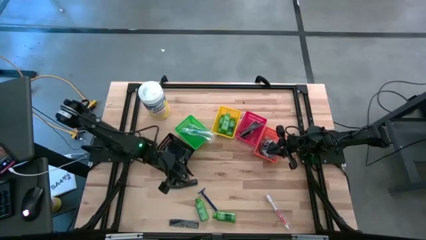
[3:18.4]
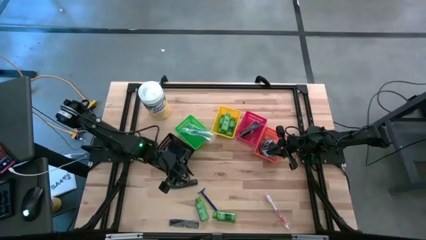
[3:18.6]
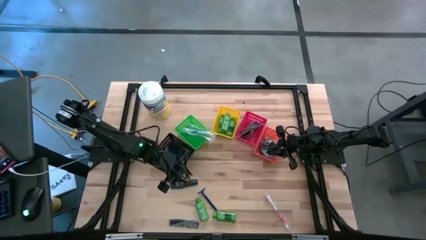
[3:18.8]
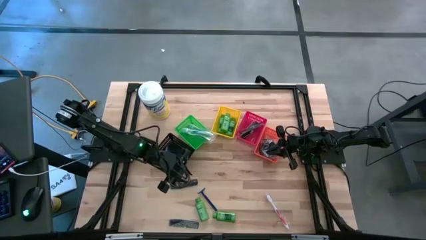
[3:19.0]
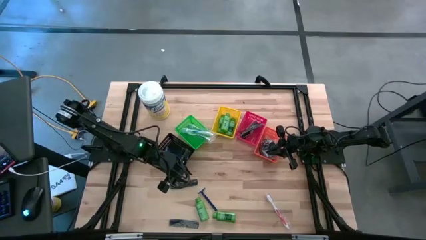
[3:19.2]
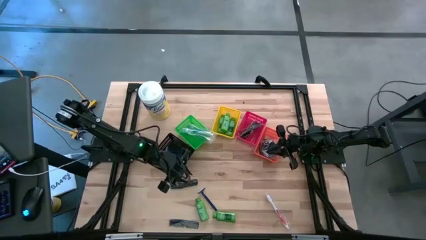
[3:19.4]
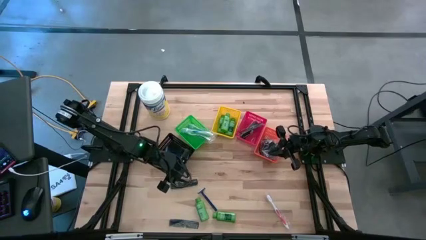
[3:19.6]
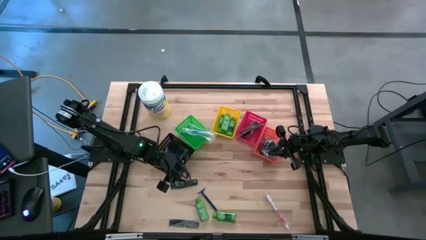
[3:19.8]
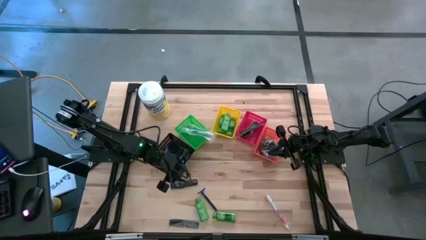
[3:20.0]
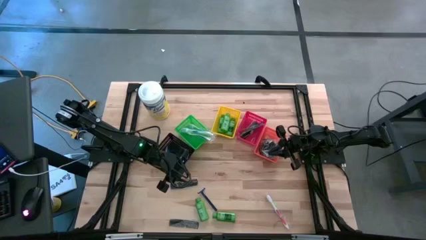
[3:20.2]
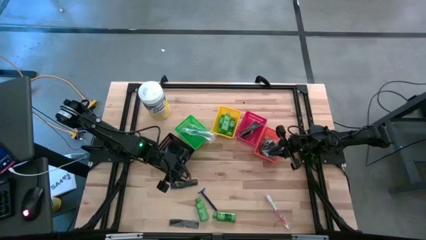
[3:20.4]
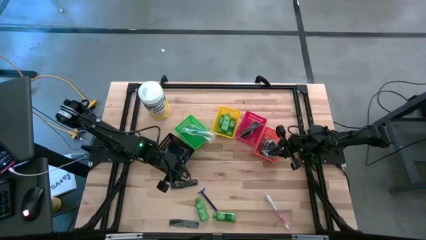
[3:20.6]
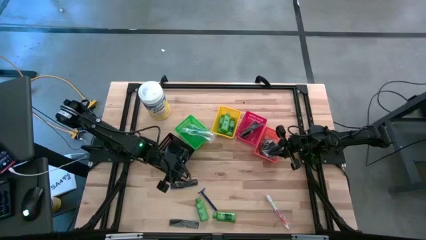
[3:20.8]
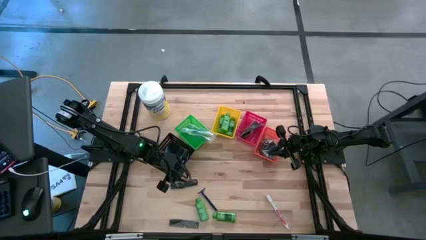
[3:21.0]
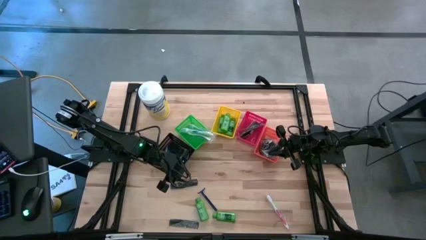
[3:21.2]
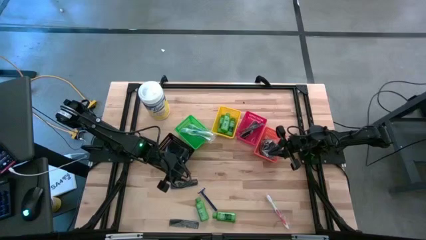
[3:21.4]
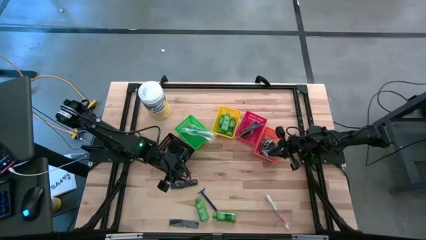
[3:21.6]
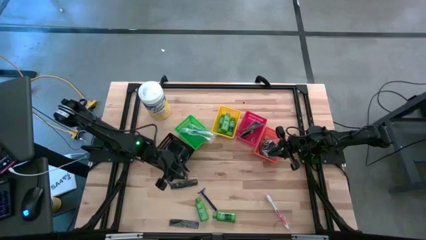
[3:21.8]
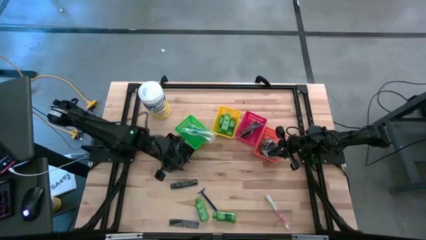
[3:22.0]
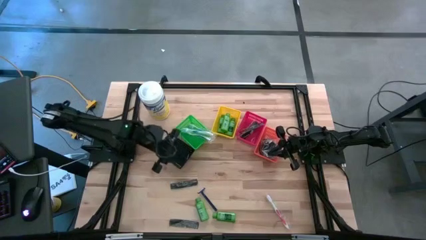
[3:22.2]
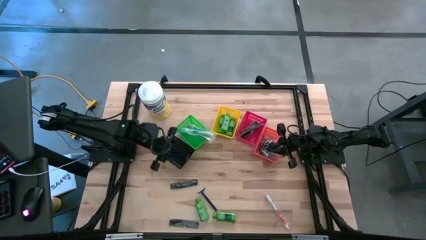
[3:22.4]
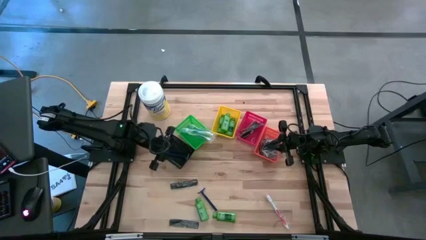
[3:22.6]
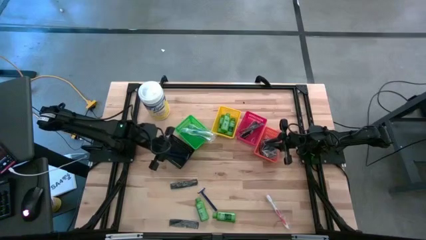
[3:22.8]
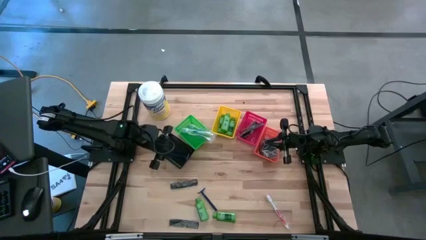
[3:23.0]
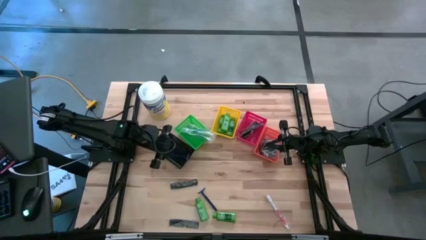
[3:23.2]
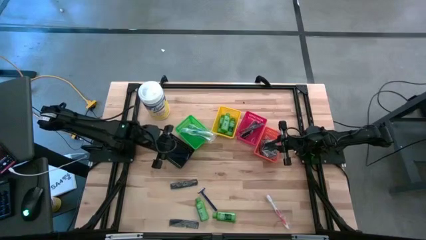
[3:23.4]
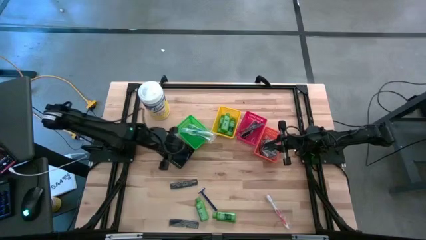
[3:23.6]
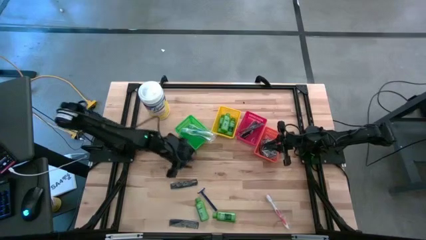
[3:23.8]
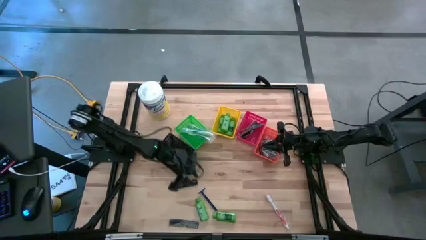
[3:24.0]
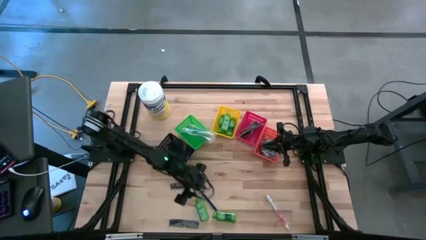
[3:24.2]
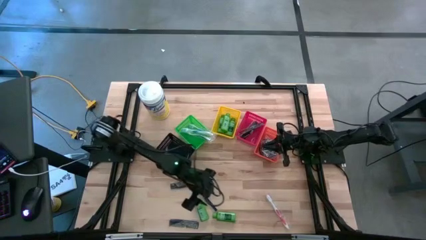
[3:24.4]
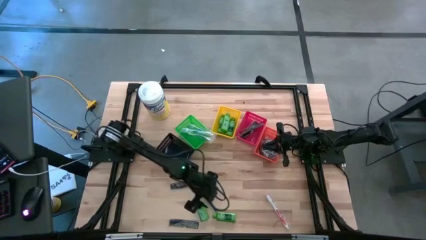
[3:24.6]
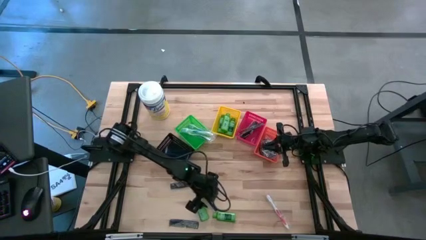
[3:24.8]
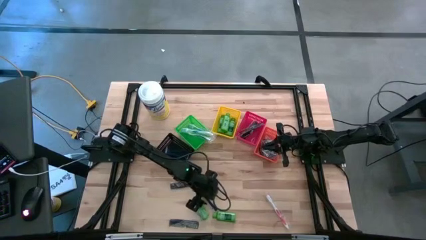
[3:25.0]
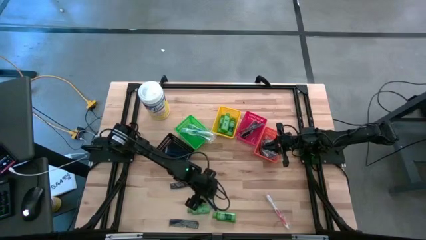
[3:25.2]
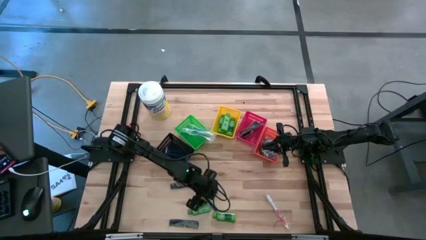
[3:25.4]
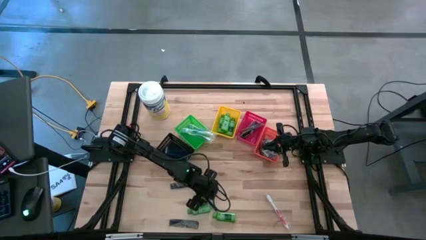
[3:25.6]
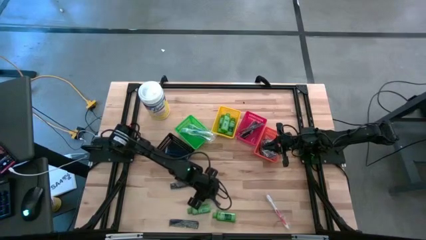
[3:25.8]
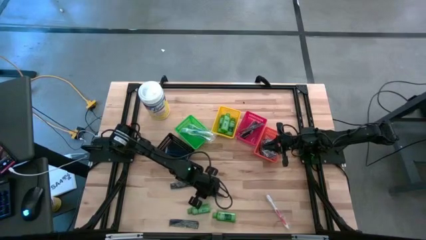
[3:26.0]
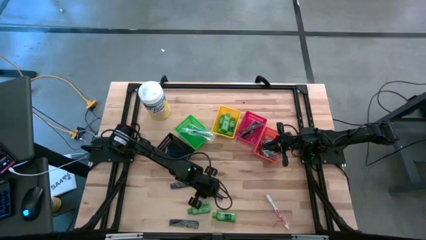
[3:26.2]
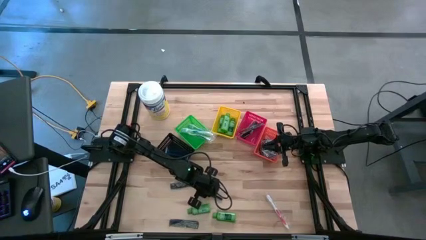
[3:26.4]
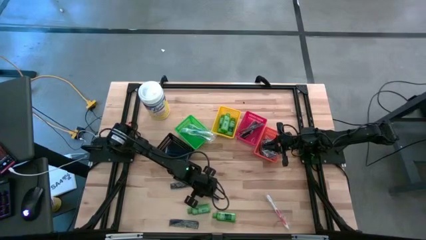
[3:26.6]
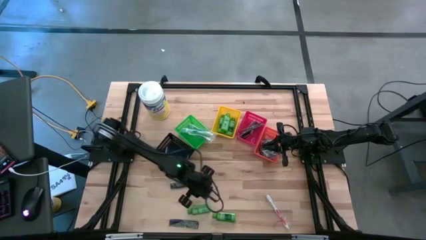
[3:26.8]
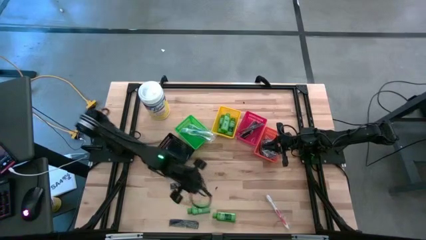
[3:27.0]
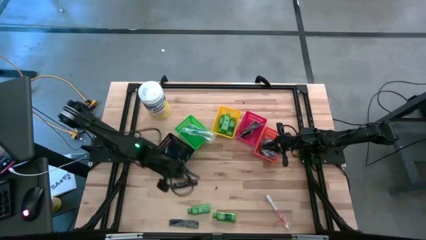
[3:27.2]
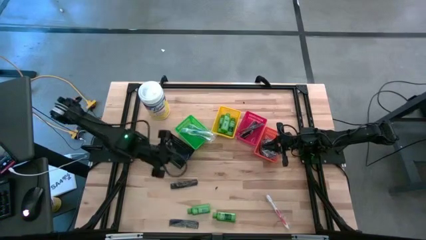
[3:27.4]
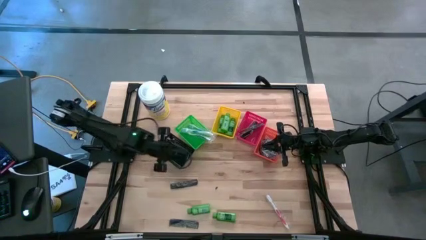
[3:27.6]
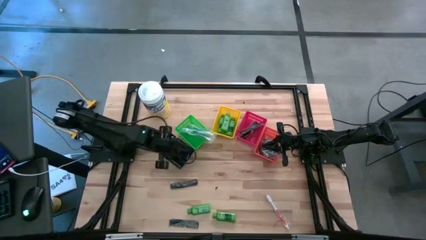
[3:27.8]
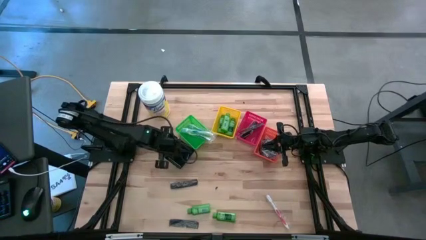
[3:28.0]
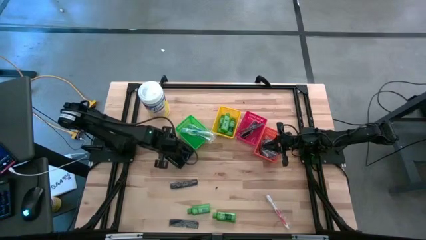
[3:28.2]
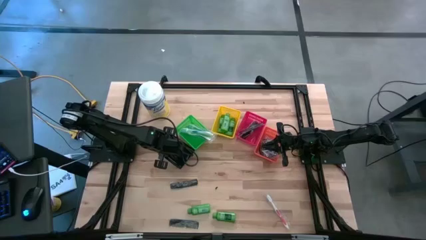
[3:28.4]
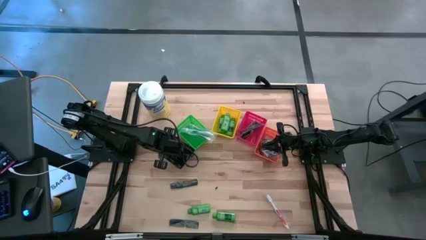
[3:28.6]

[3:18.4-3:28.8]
Task: Pick & Place Travel size toiletries
Put the blue razor into the black bin

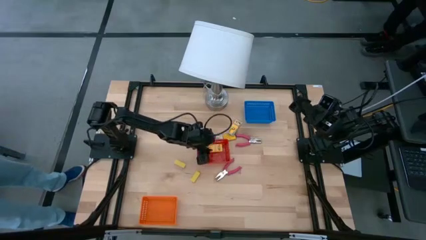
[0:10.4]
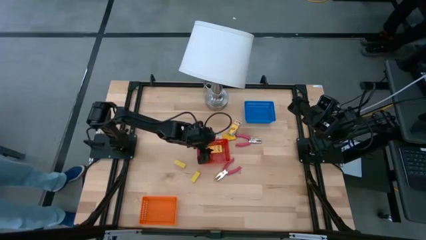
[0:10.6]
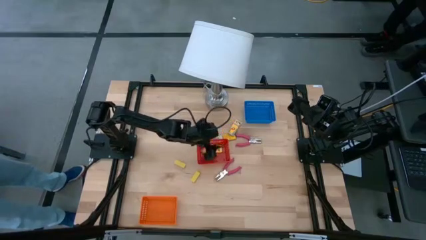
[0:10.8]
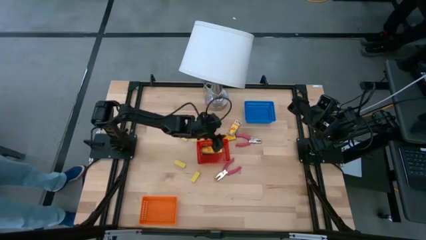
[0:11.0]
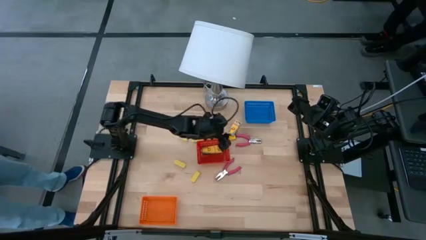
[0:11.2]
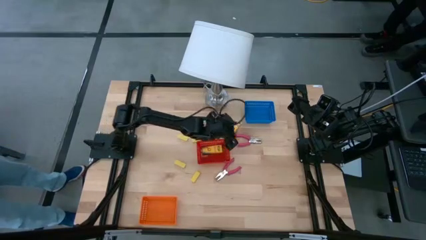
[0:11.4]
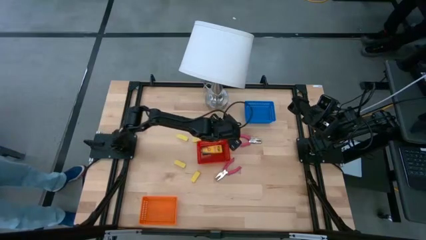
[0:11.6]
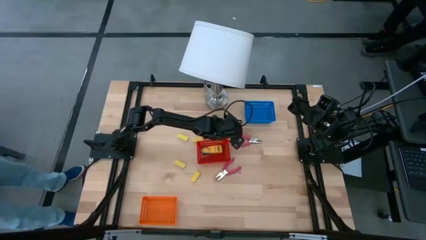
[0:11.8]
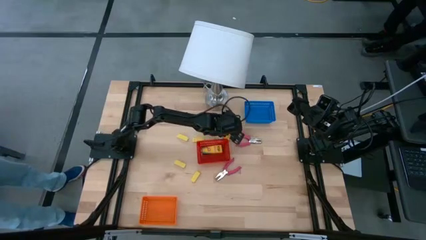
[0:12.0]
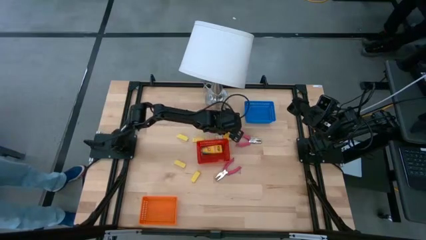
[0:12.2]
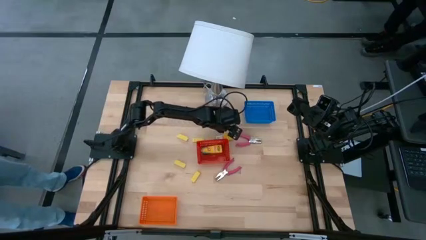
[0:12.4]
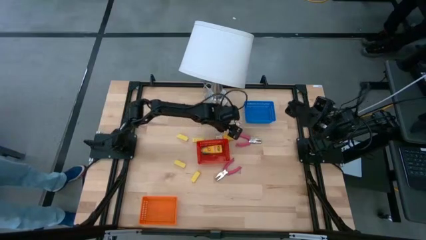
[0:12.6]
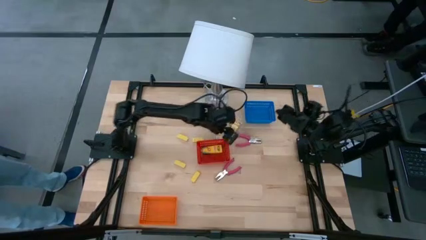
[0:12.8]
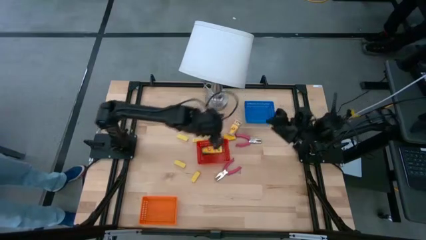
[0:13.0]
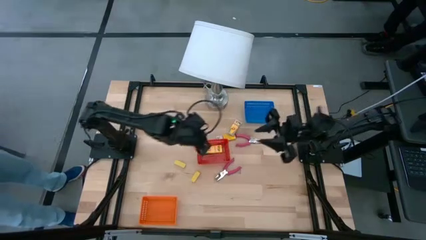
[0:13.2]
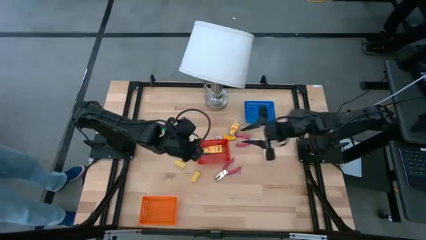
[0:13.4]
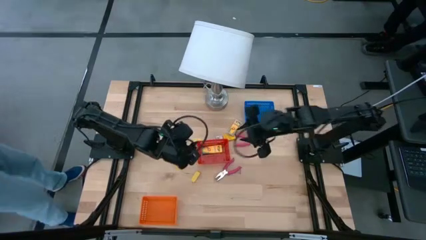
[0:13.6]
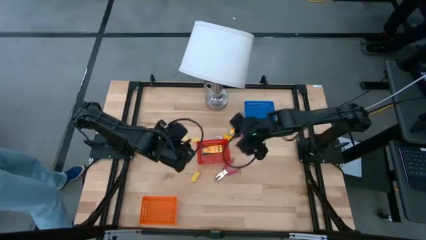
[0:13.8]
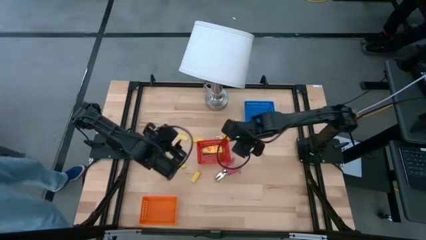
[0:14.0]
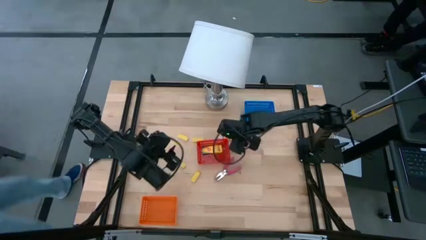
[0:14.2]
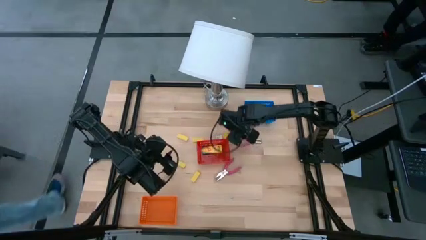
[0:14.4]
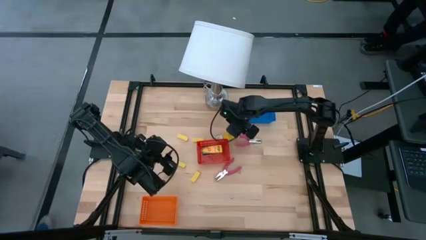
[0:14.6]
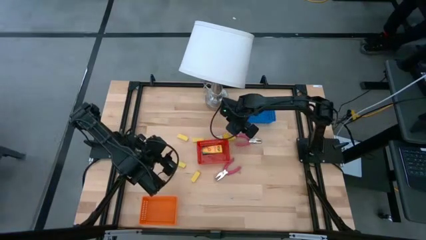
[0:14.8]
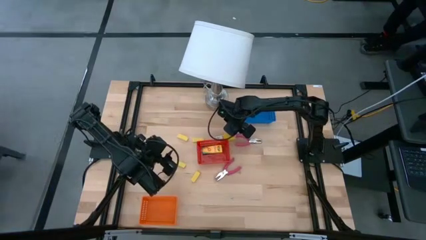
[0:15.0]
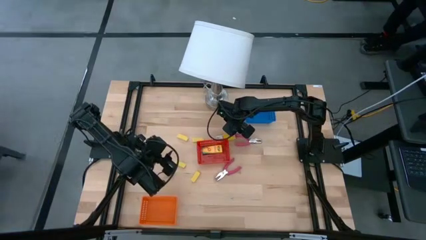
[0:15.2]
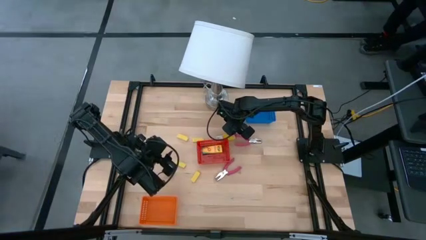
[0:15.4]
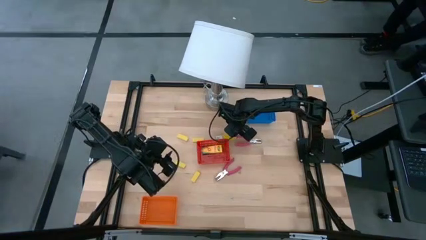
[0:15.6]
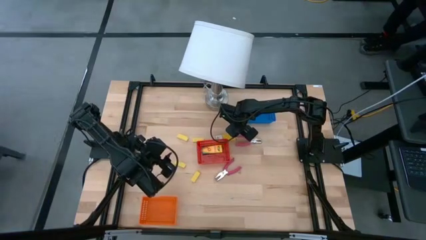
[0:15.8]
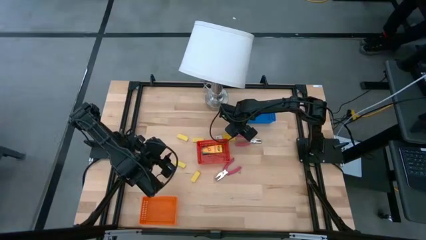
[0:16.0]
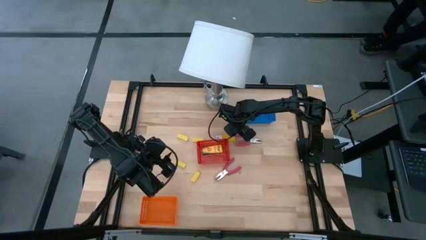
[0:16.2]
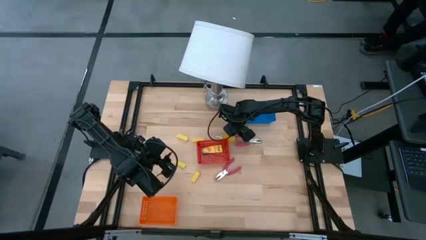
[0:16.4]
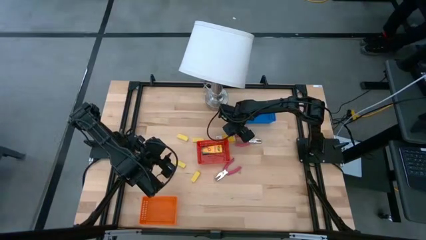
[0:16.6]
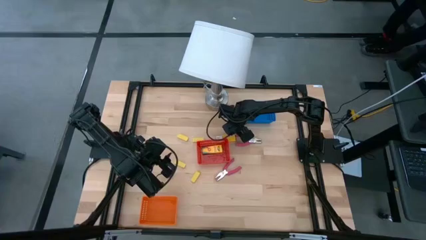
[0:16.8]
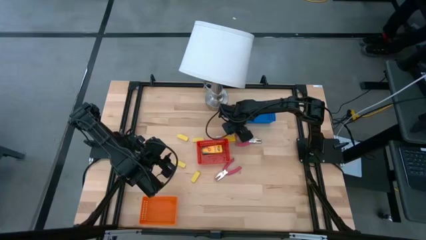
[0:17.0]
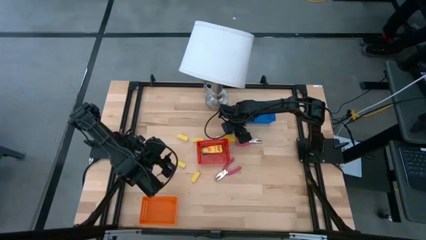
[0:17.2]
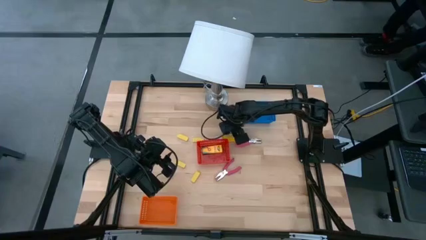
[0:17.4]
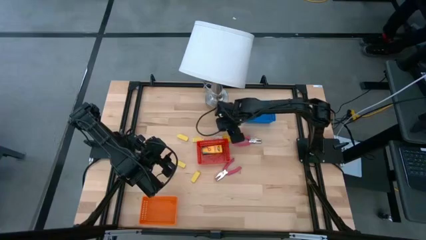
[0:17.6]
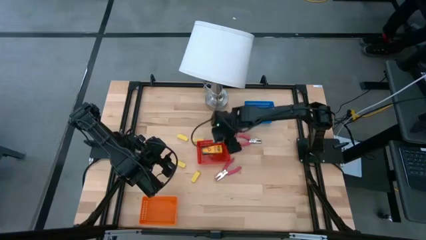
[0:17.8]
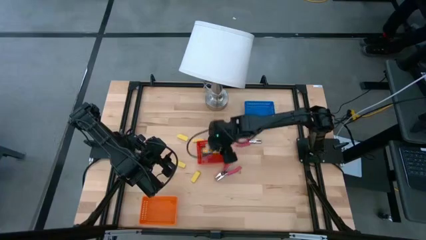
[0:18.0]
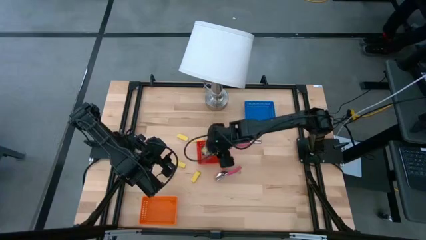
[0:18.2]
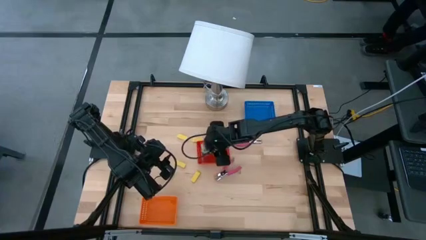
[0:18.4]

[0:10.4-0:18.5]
Task: Pick & Place School Supplies
Put the yellow crayon box into the red bin
